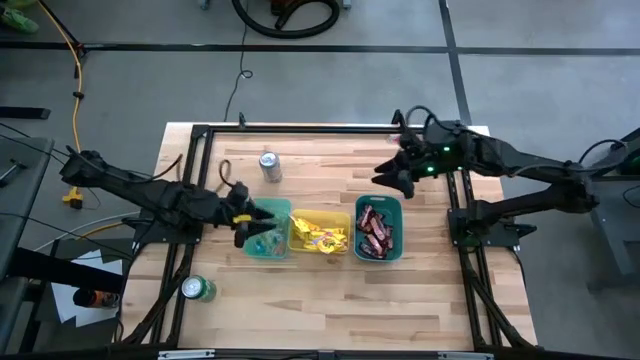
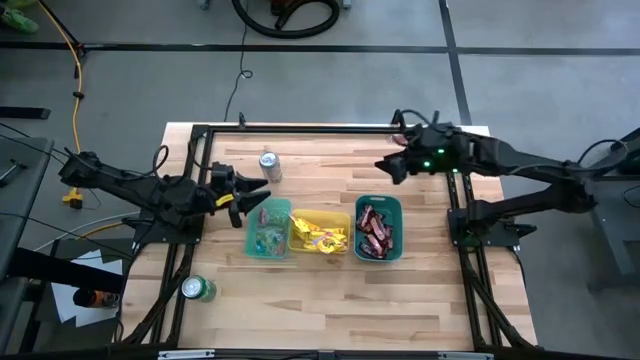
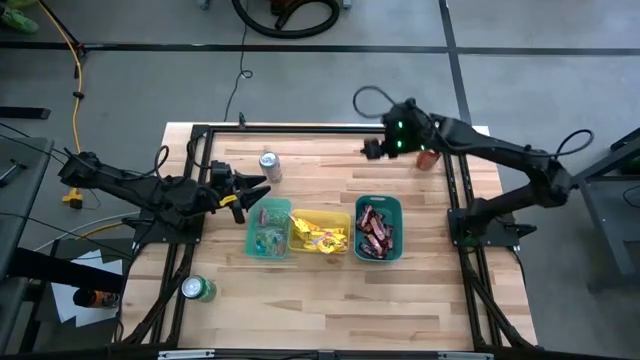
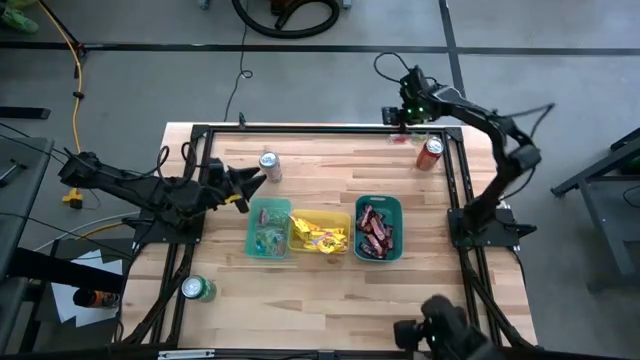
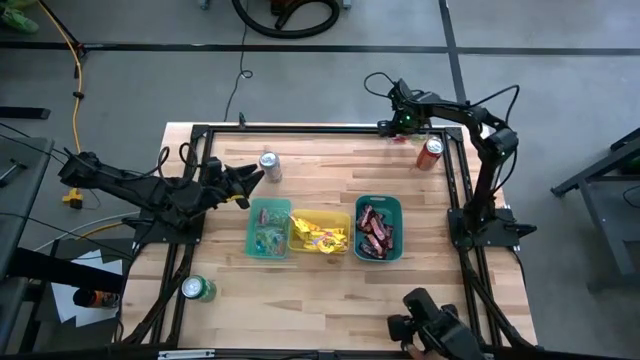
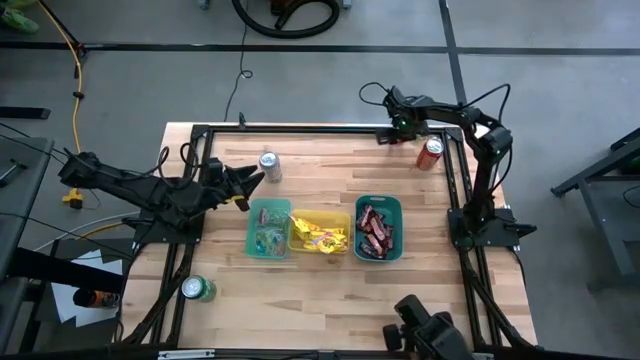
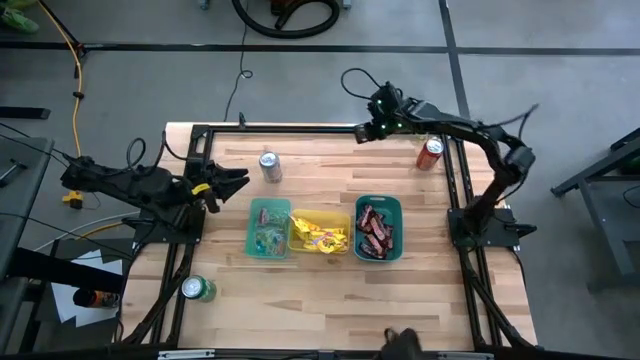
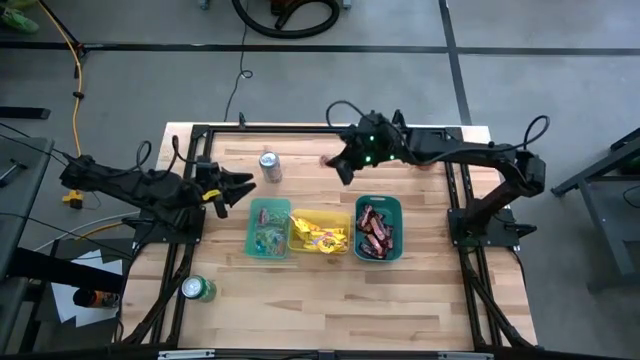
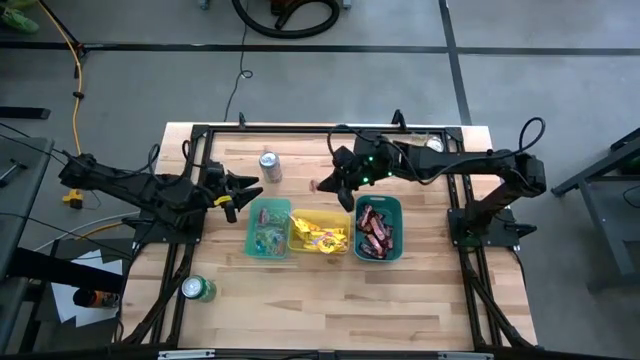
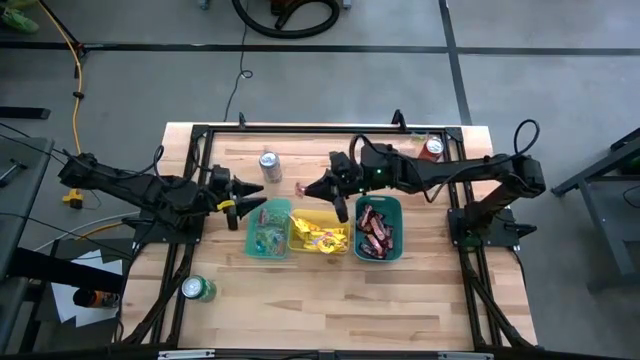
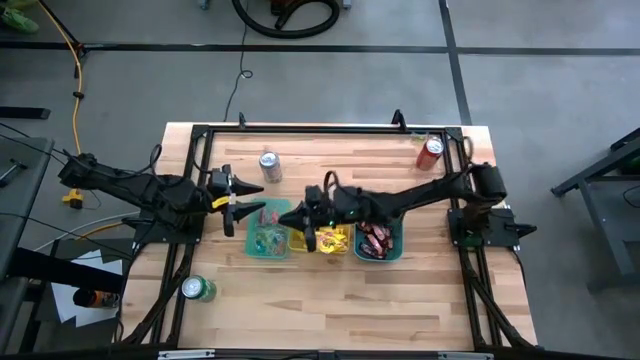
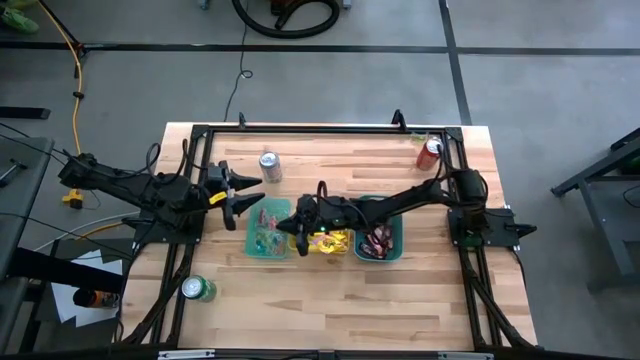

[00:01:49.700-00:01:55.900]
Task: Sort candy
Put the red gummy into the green bin

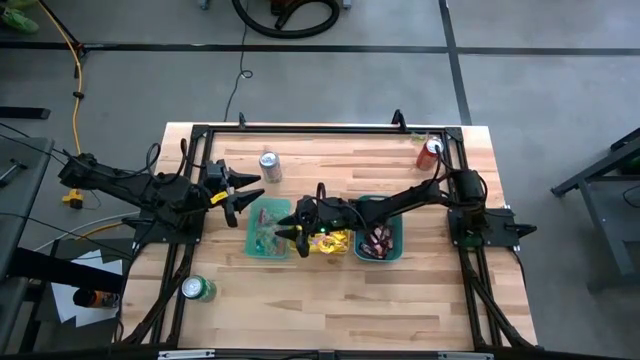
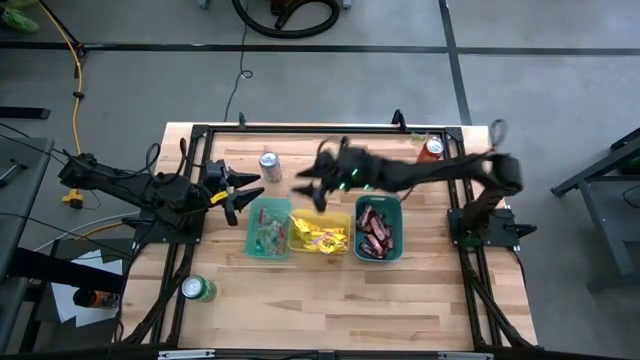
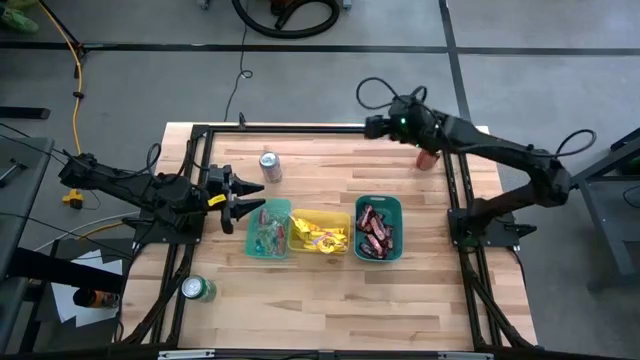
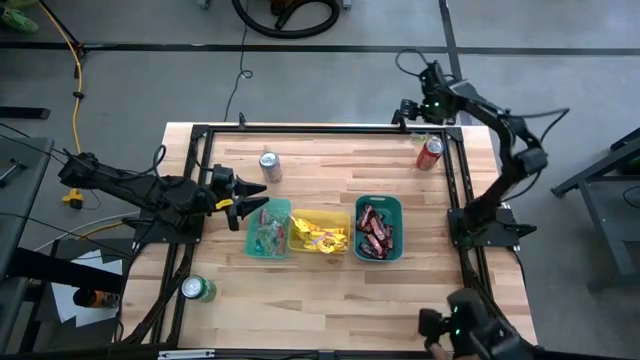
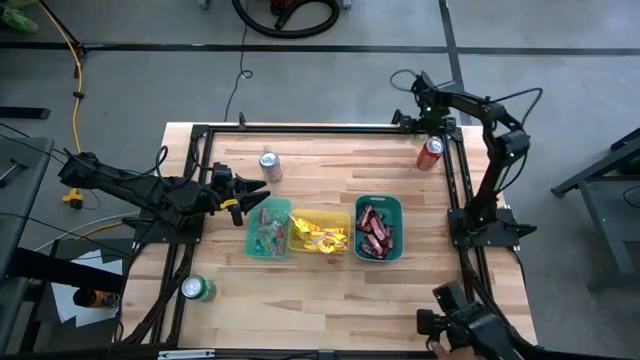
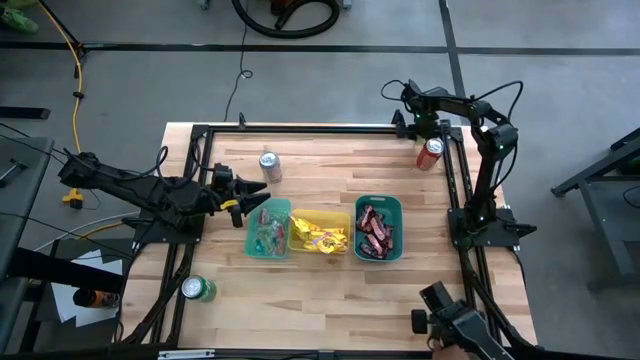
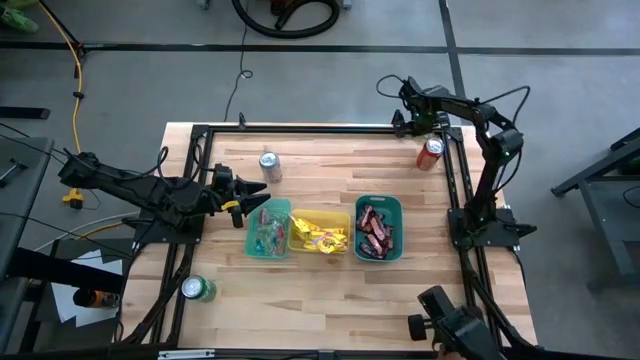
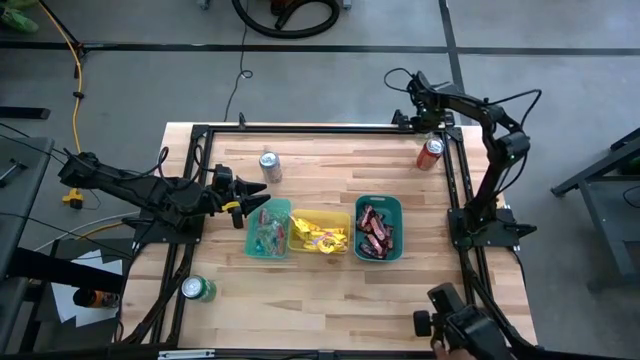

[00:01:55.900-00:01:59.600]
Put the green gummy into the green bin

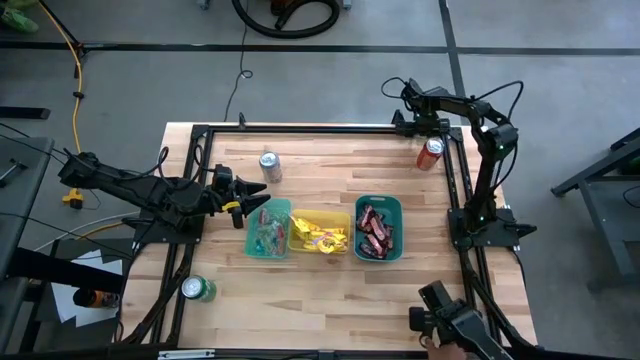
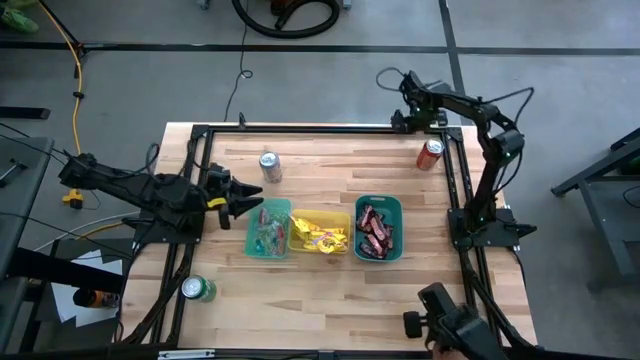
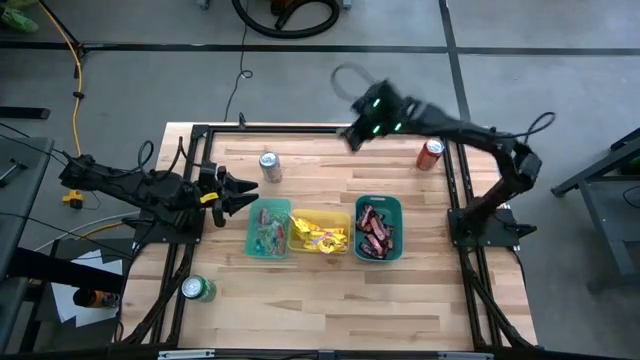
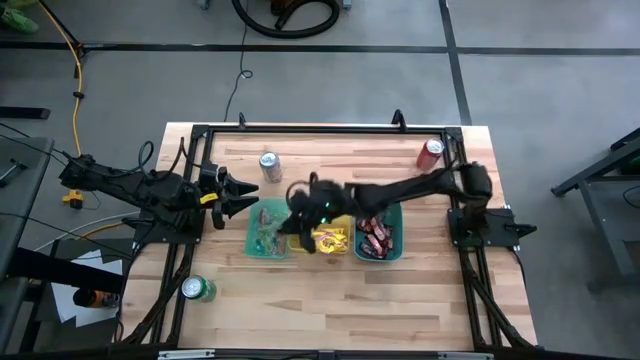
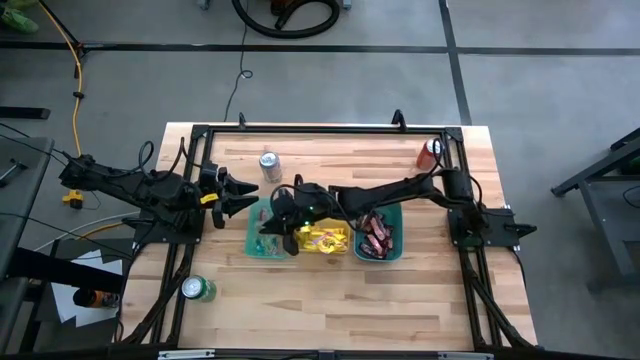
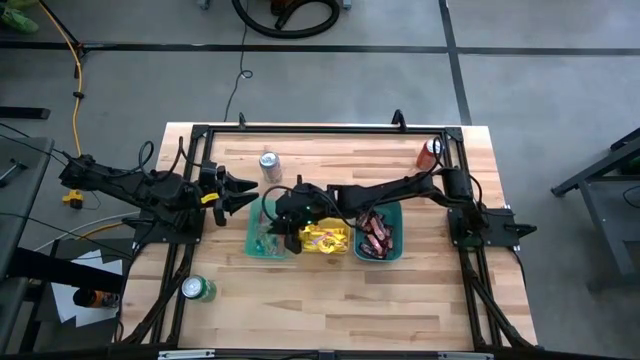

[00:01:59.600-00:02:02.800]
Put the green gummy into the green bin

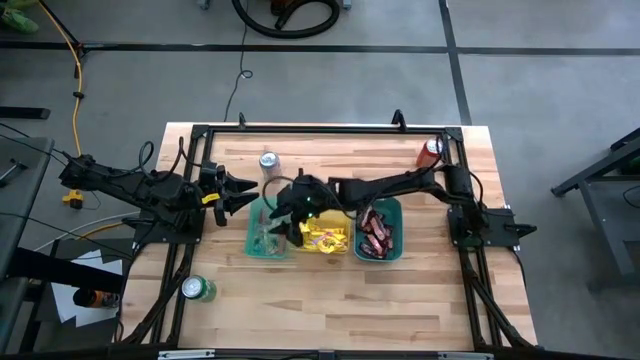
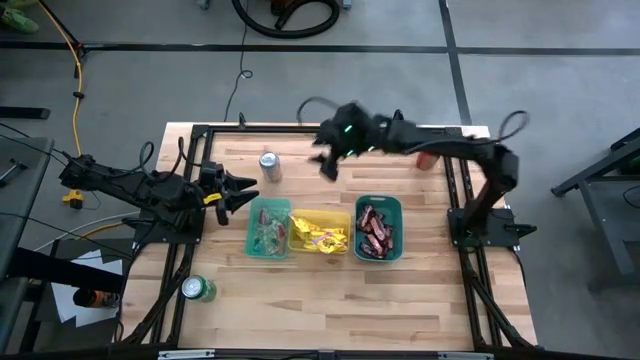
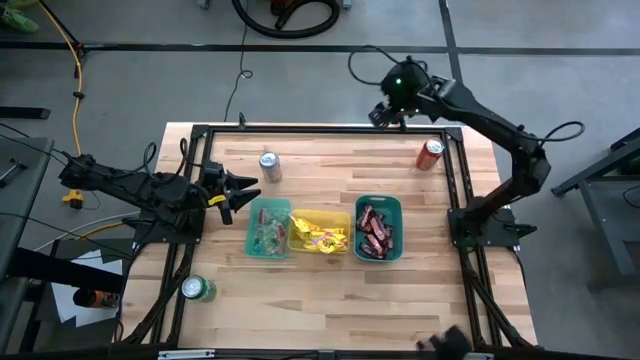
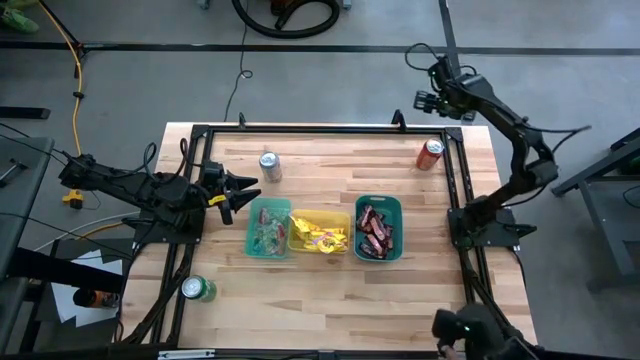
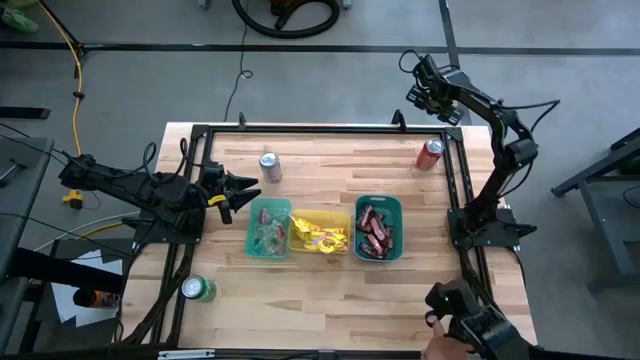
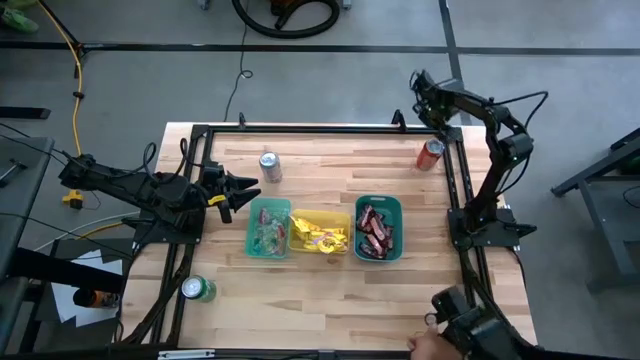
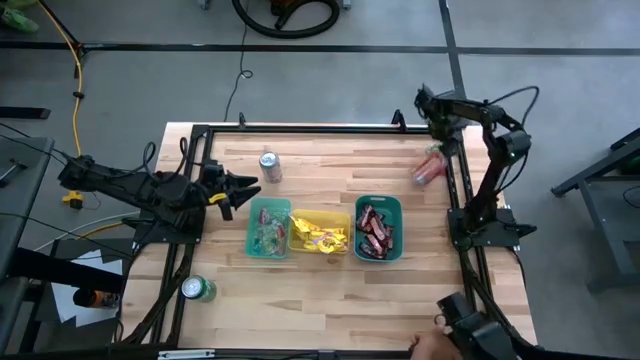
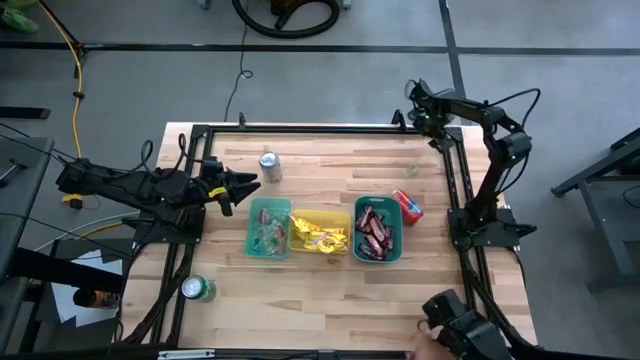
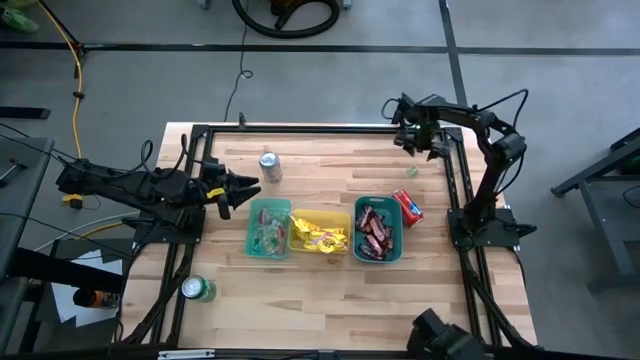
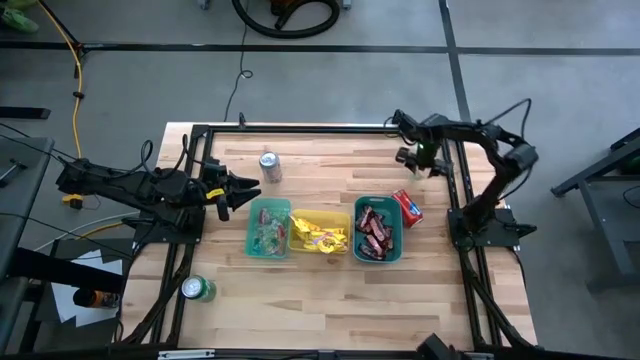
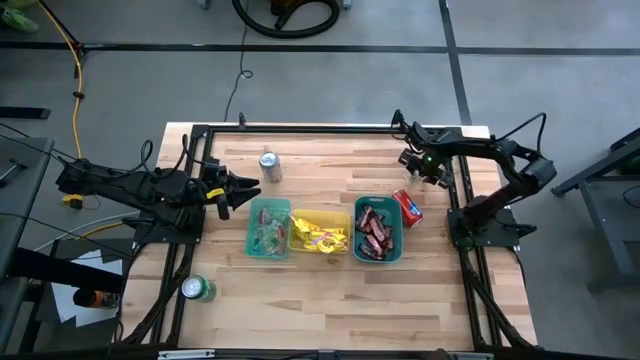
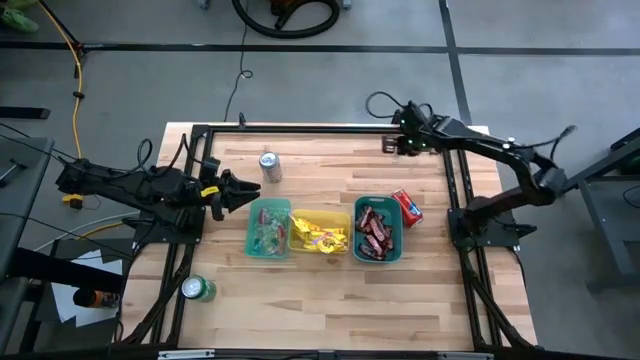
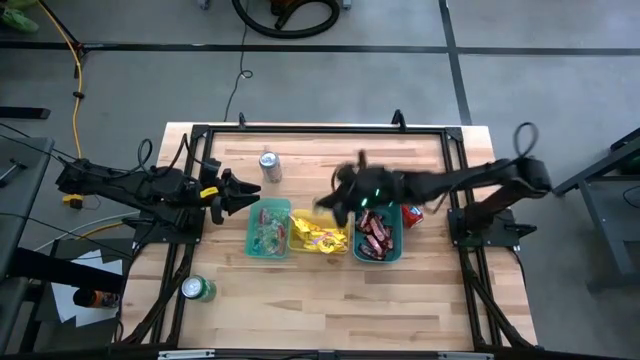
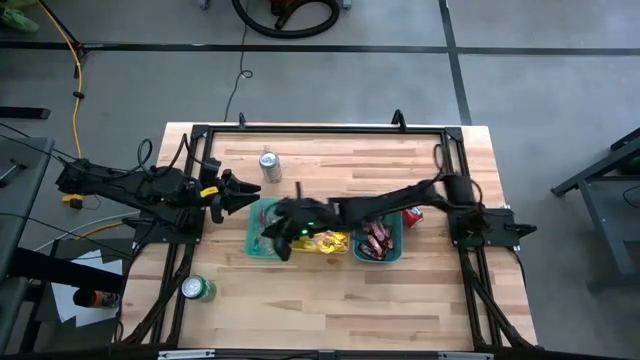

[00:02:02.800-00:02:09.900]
Put the green gummy into the green bin
